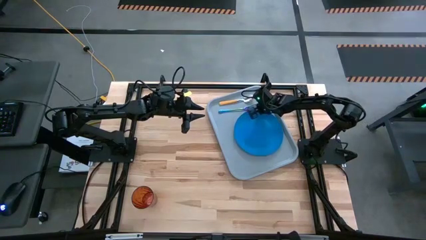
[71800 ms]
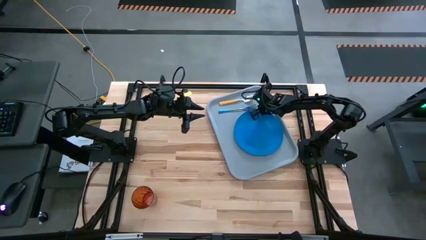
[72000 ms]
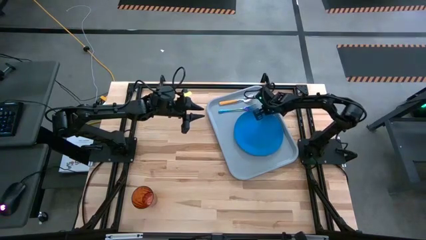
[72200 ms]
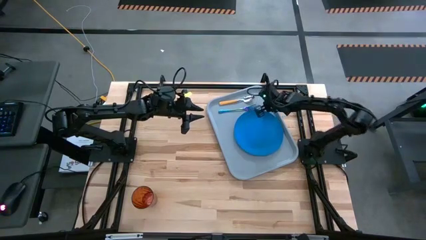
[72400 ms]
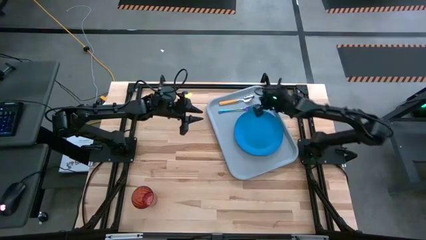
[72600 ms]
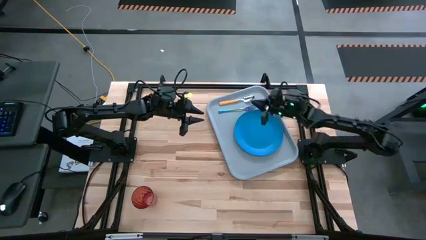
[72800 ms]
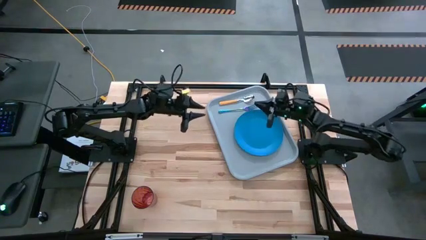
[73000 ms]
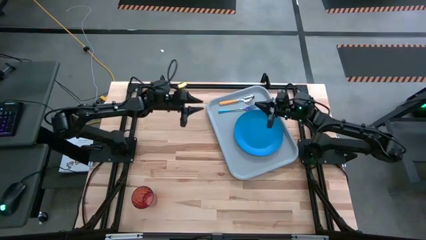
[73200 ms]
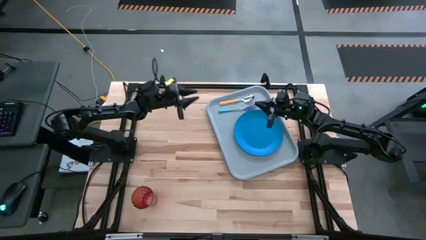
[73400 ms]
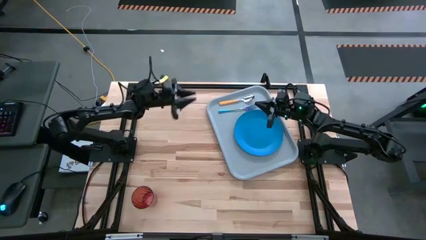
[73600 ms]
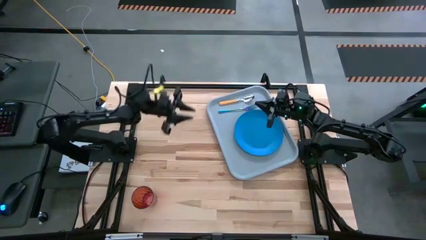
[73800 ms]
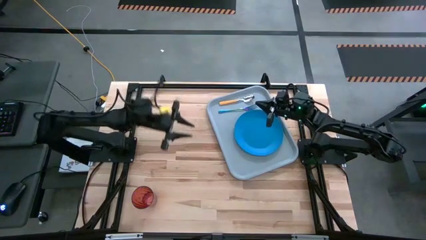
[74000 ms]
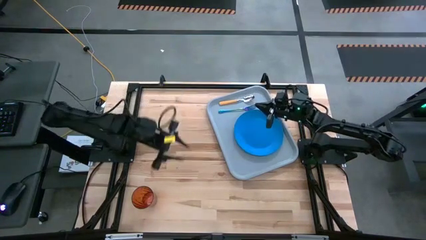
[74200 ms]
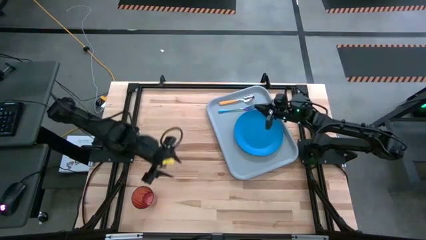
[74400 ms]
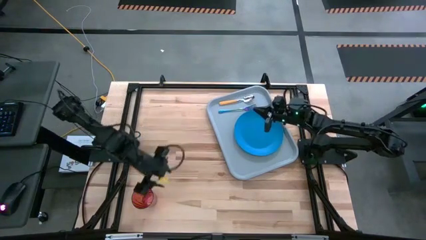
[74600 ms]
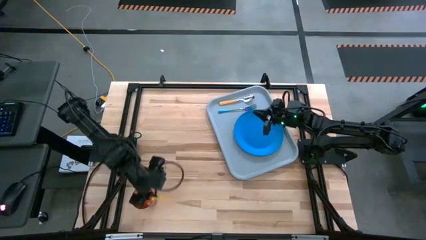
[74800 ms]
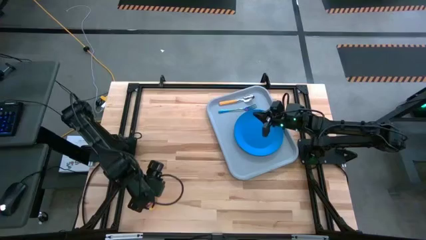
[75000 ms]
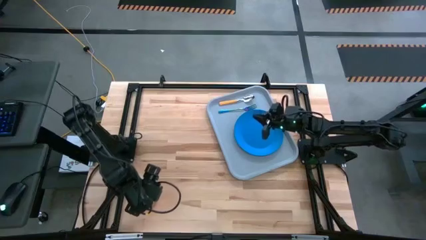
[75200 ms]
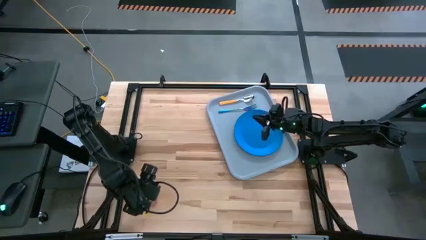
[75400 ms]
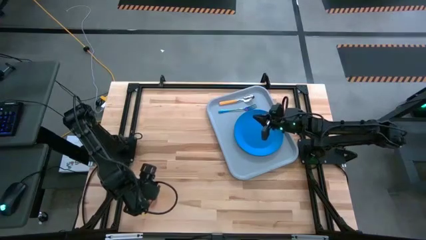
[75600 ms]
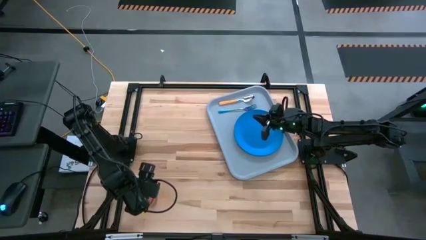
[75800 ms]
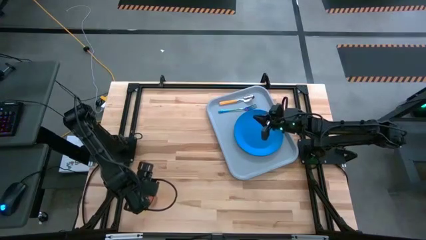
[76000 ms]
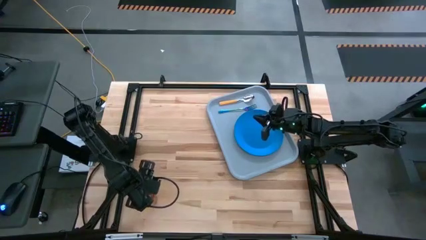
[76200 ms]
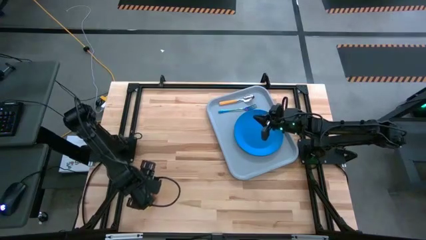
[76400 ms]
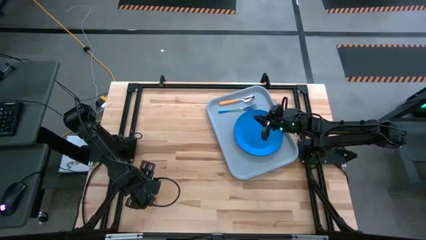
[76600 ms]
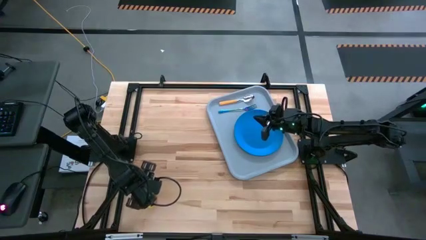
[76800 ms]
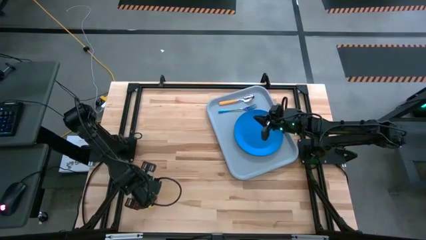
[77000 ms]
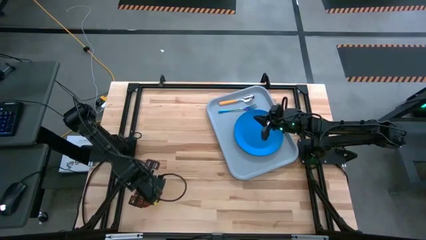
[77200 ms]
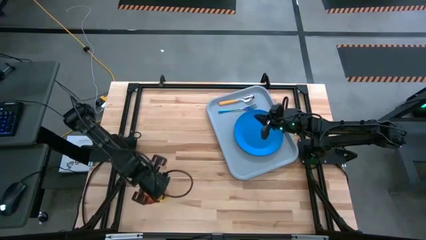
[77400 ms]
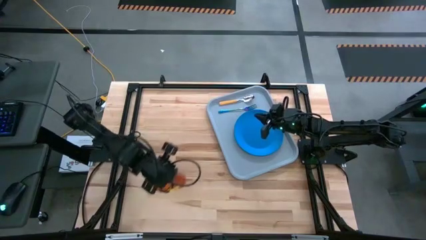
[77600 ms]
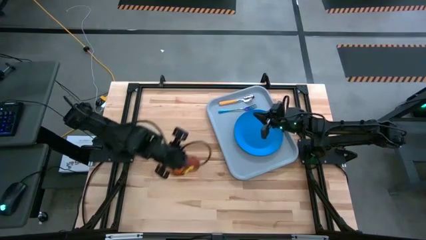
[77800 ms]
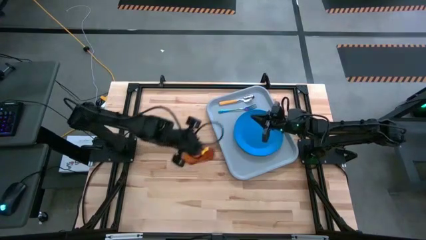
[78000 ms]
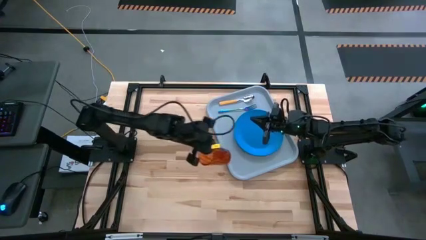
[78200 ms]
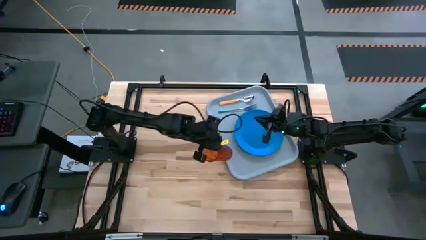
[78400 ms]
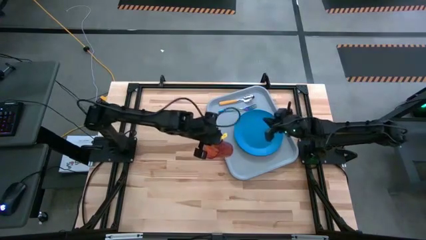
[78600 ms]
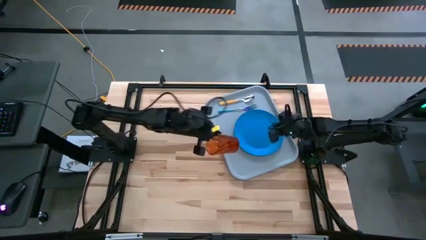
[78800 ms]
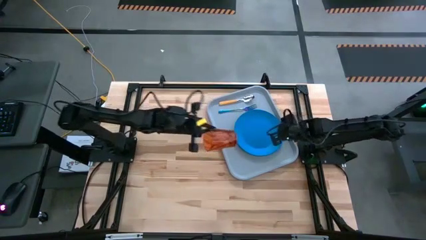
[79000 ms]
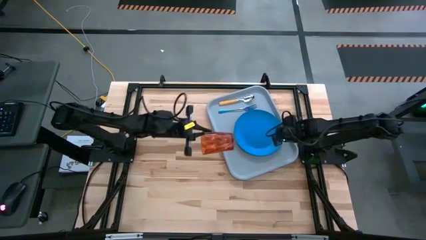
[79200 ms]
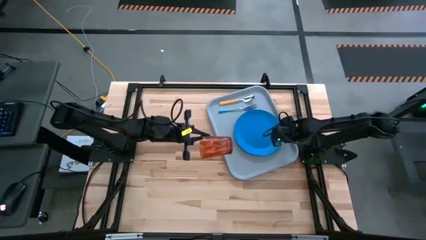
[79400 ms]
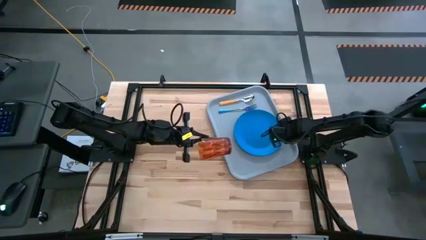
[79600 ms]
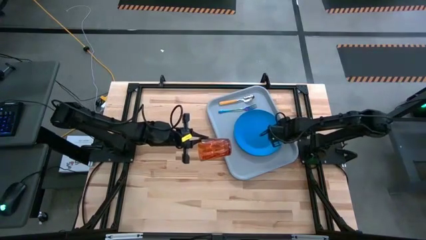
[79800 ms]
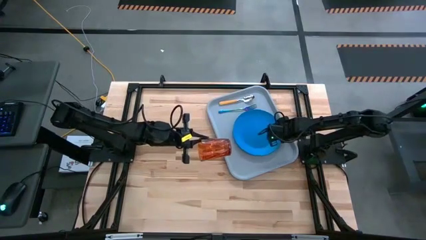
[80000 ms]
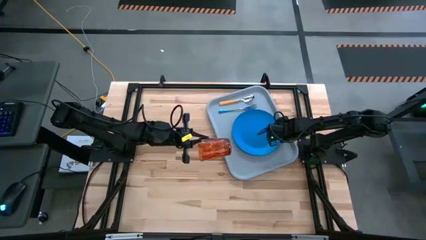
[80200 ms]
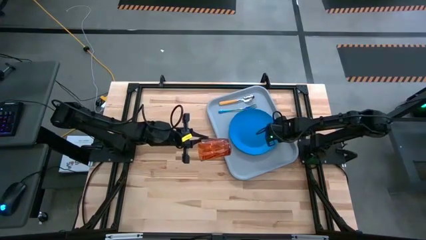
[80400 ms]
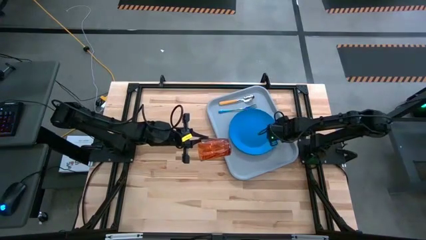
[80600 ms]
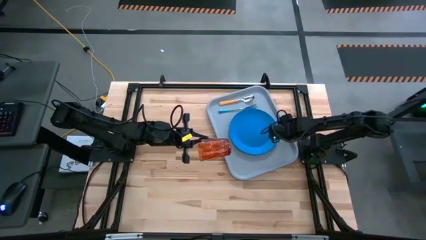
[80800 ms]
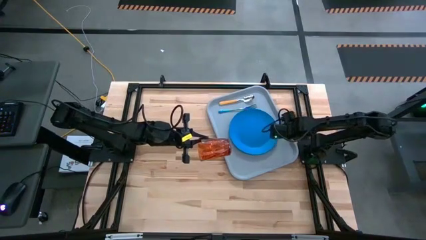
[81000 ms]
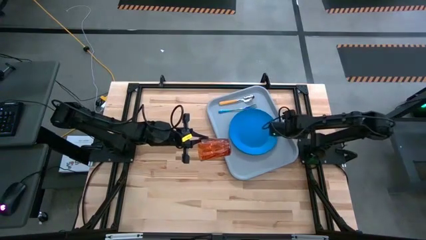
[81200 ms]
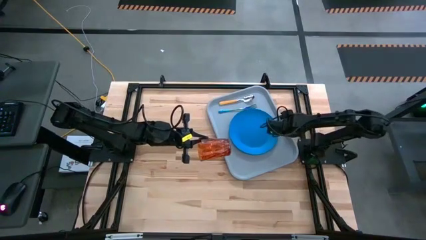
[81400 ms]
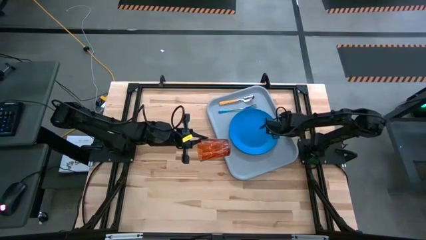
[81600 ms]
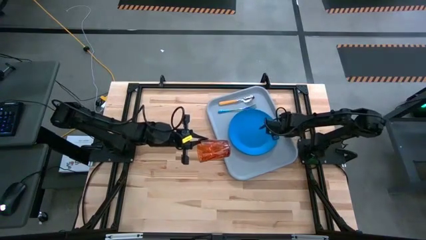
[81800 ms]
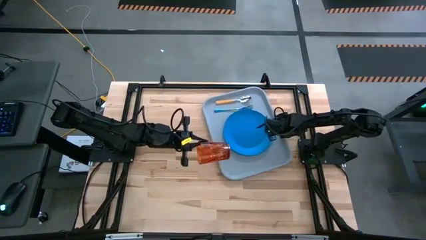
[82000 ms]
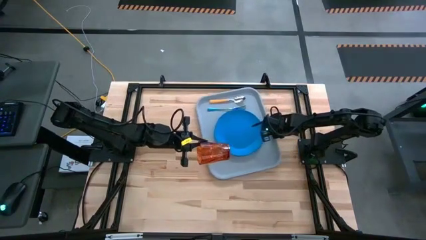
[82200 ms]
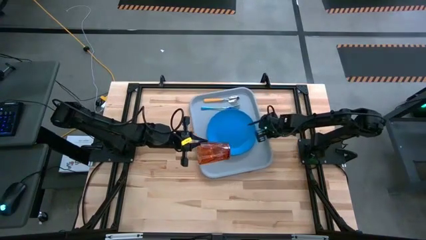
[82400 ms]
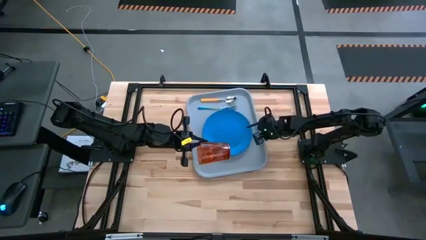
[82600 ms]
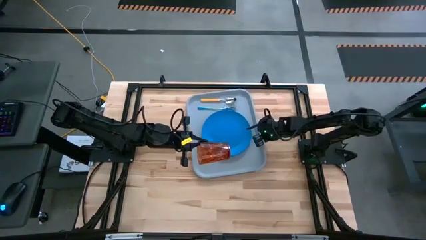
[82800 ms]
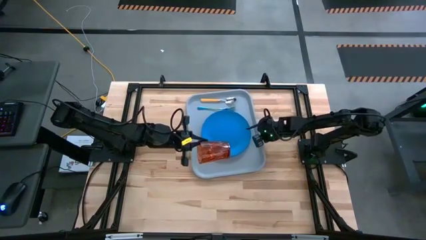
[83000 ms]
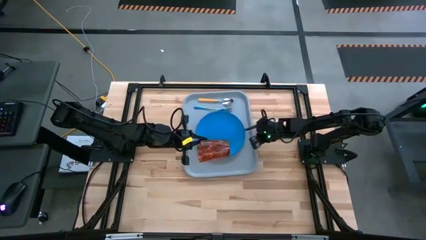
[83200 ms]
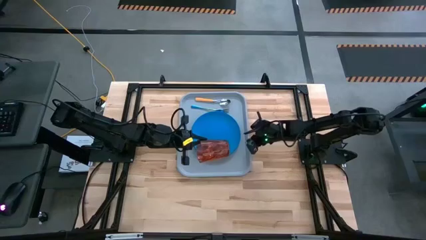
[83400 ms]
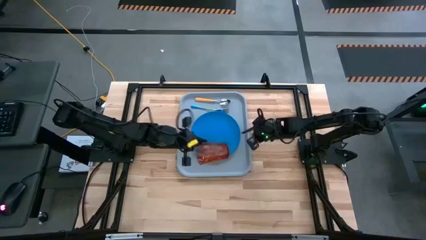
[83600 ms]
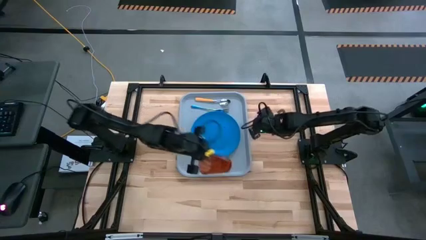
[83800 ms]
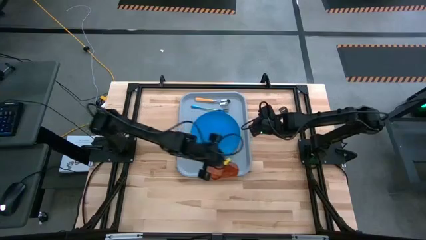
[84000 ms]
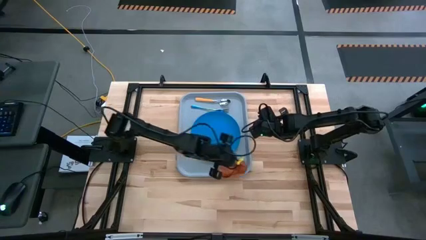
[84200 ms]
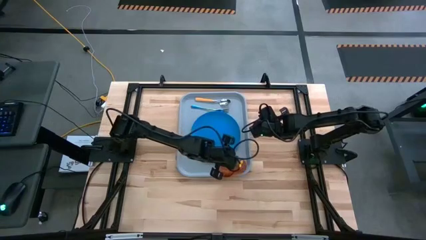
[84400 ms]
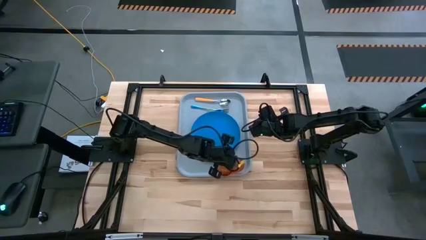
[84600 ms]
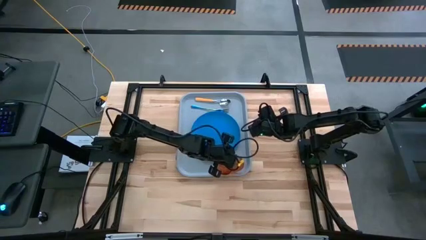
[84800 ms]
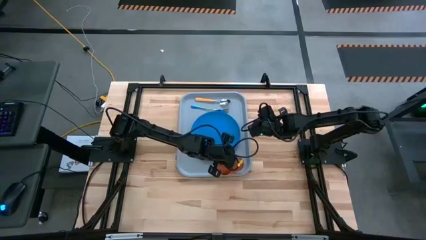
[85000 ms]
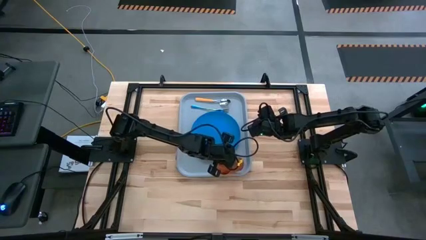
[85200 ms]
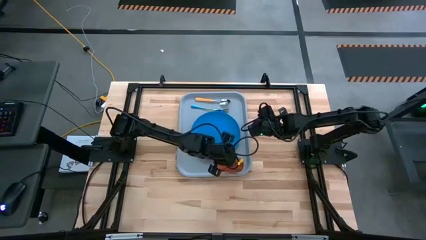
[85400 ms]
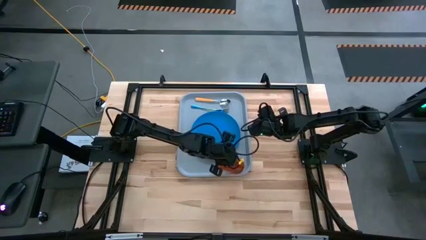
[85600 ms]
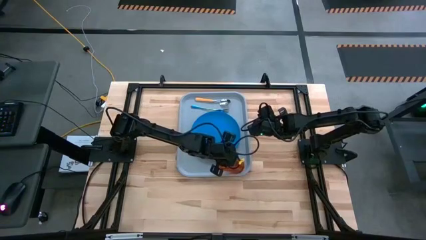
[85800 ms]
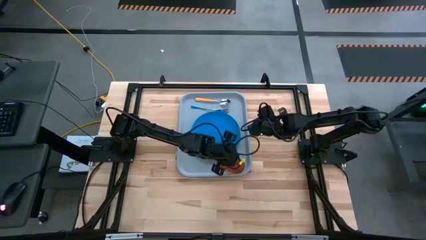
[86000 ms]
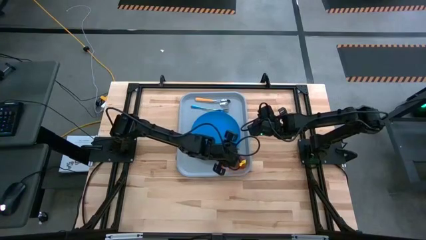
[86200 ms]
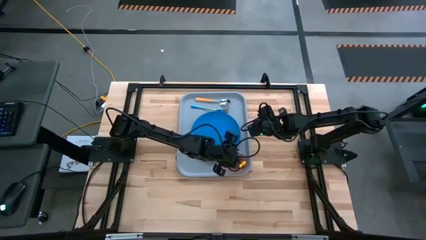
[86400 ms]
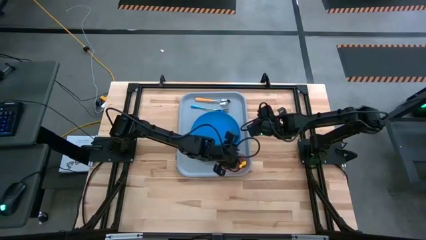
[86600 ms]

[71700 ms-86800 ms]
Task: Pick and place plate/cup/fork/spoon on tray
Put the orange cup on the gray serving tray to the top left of the blue plate
